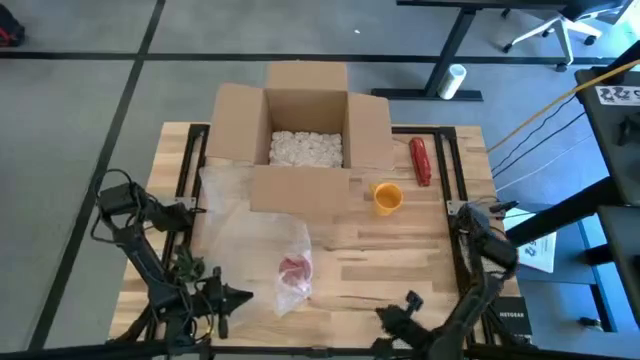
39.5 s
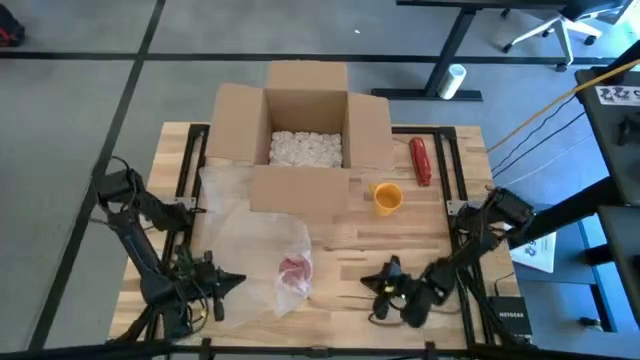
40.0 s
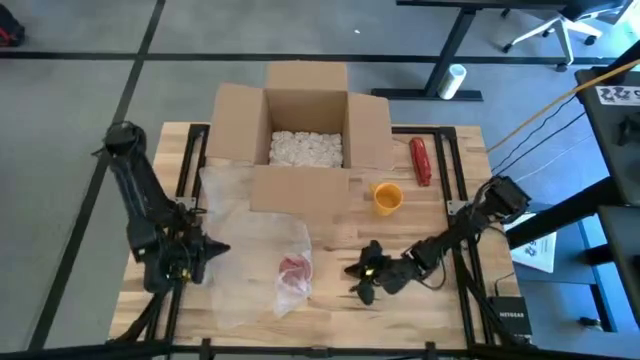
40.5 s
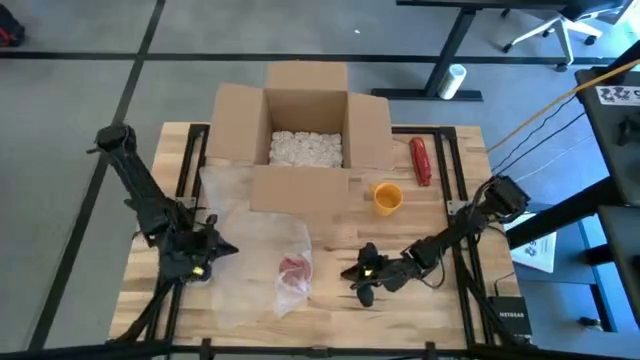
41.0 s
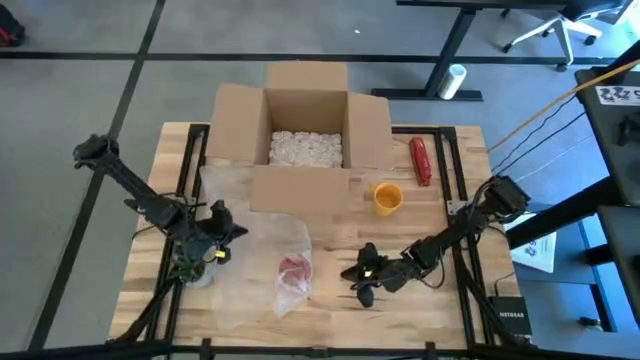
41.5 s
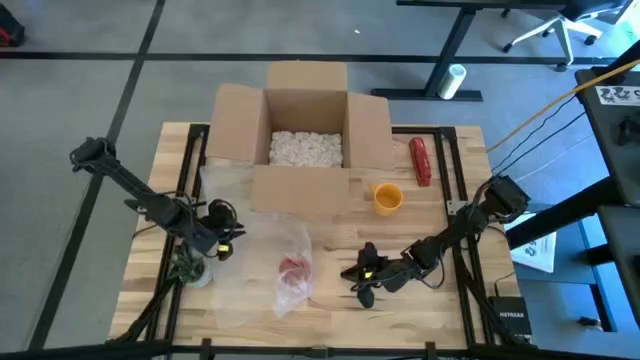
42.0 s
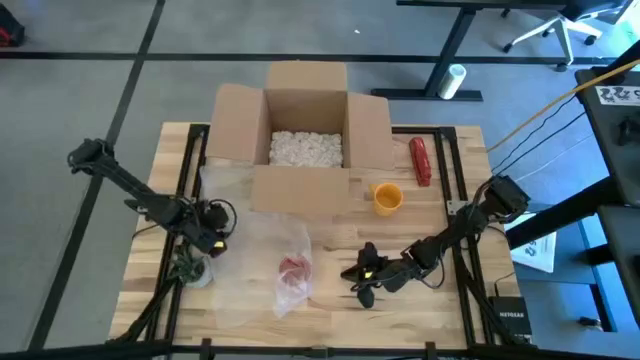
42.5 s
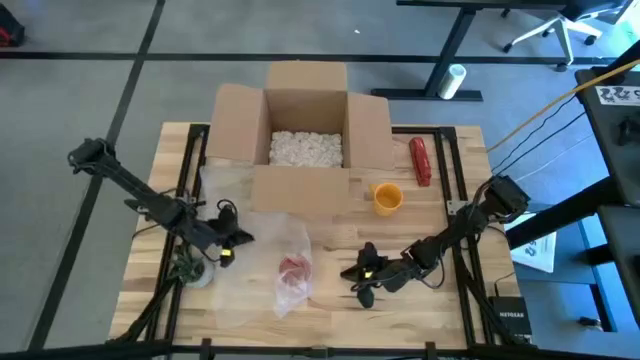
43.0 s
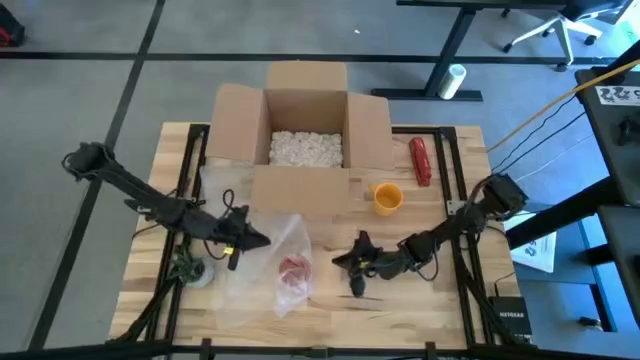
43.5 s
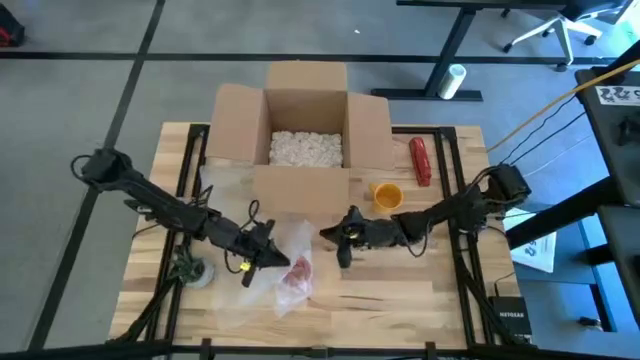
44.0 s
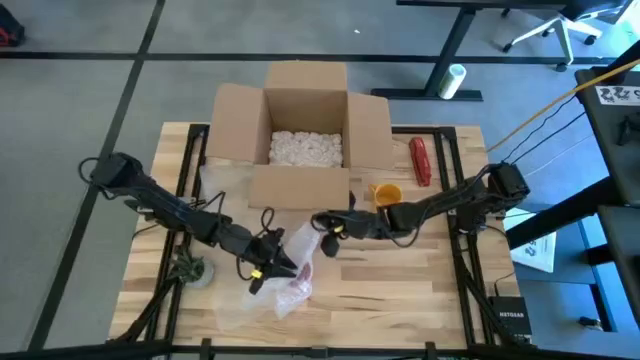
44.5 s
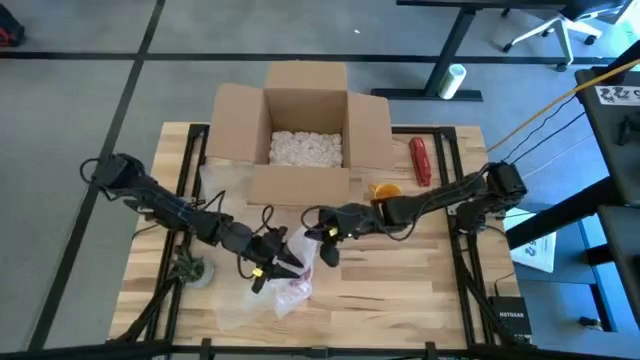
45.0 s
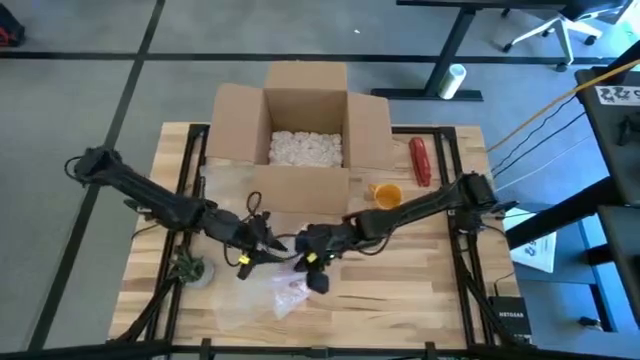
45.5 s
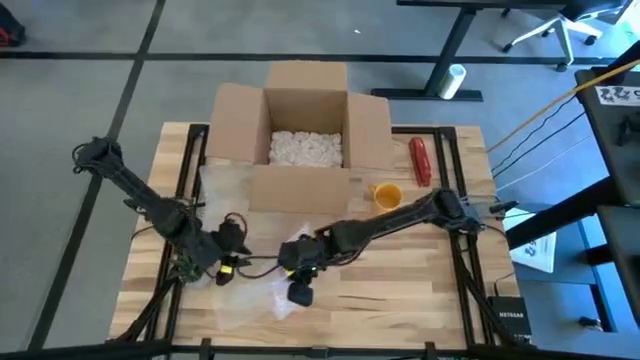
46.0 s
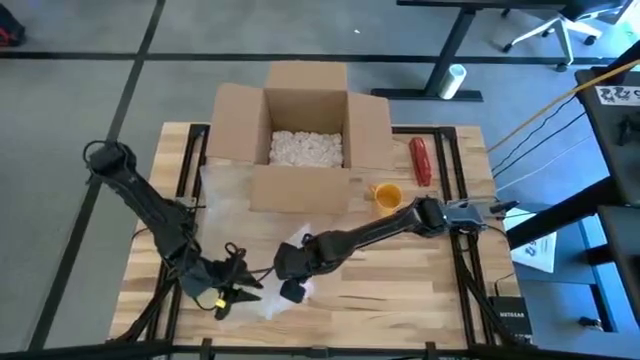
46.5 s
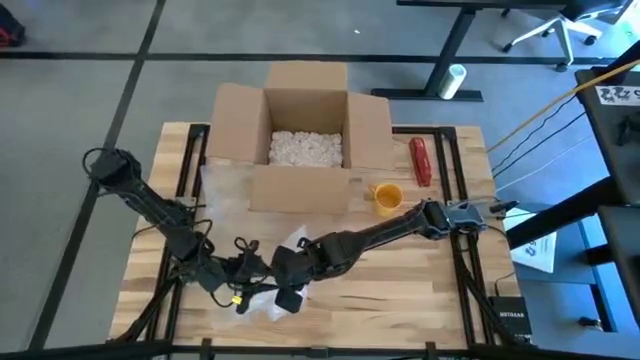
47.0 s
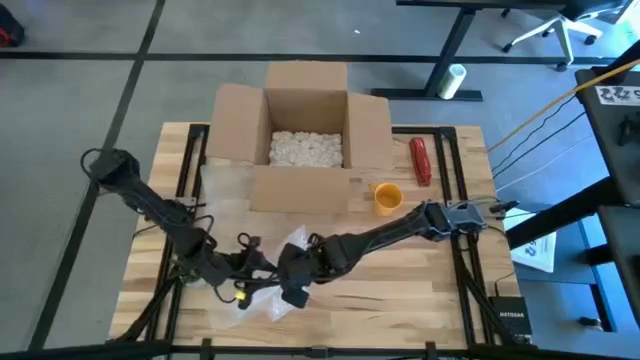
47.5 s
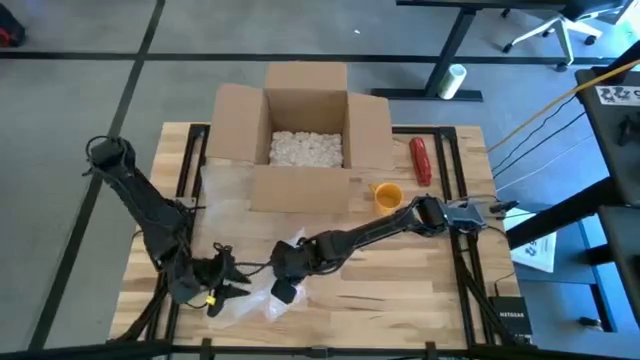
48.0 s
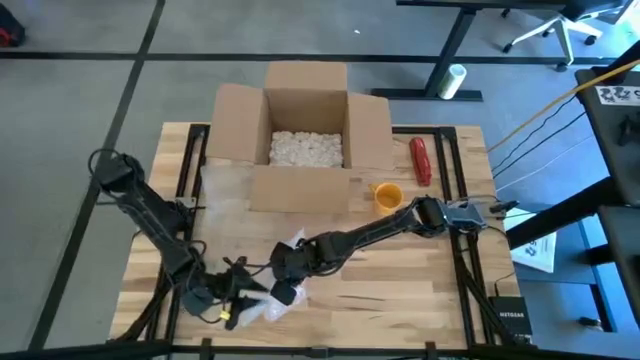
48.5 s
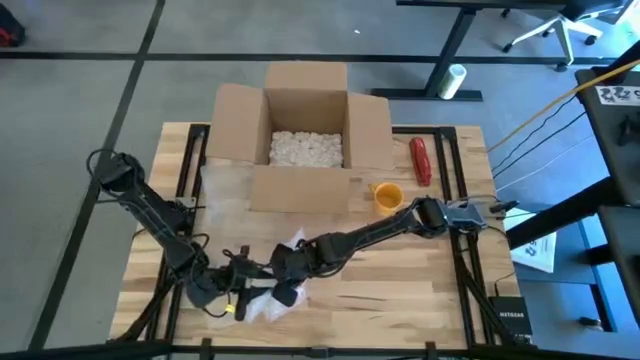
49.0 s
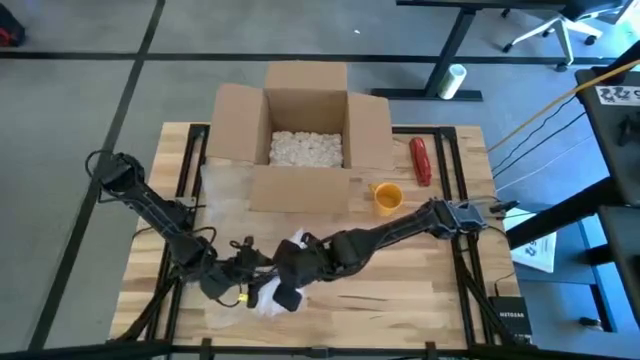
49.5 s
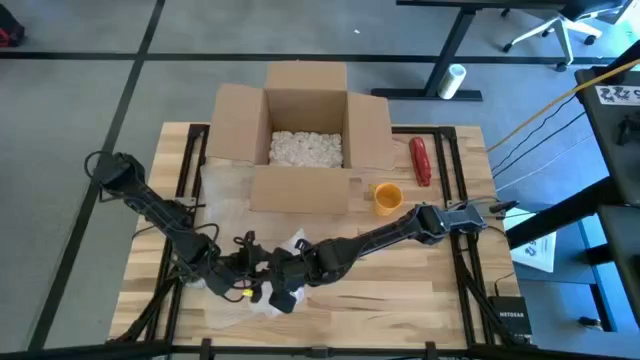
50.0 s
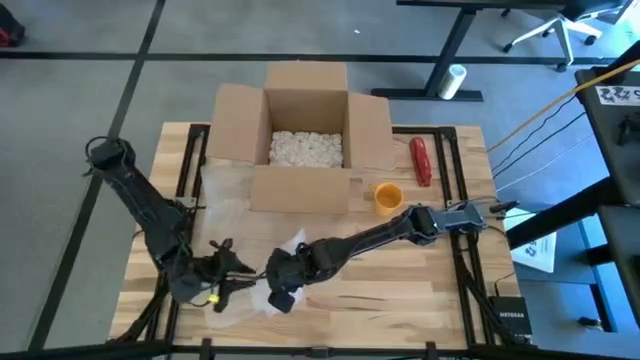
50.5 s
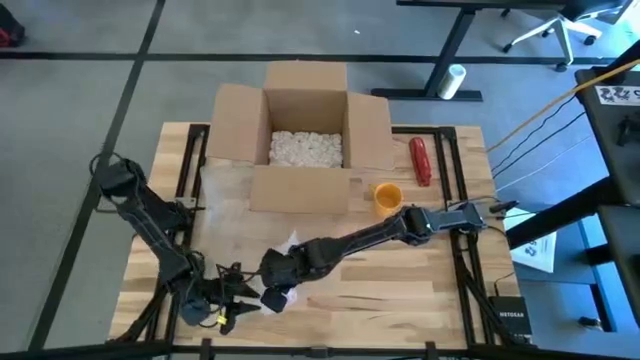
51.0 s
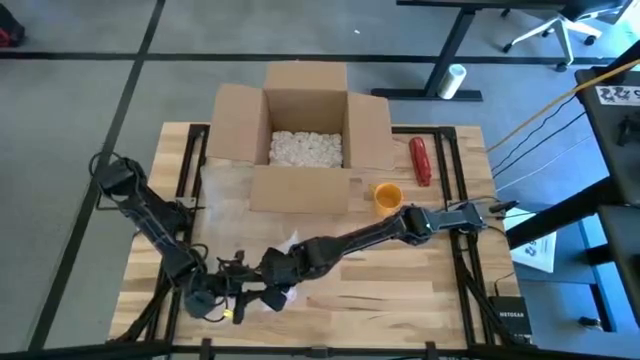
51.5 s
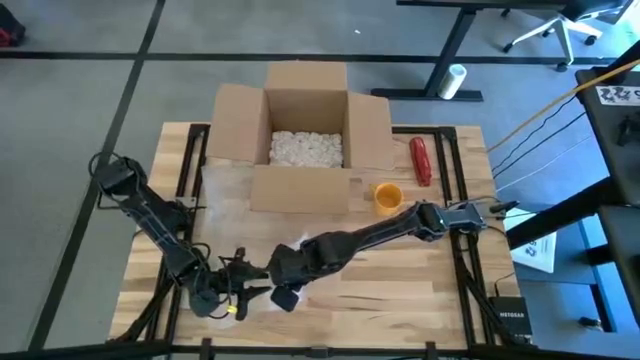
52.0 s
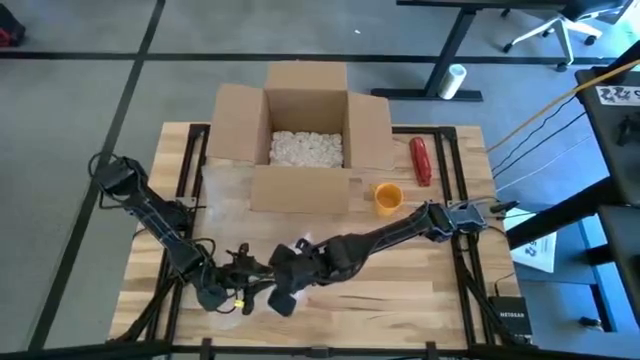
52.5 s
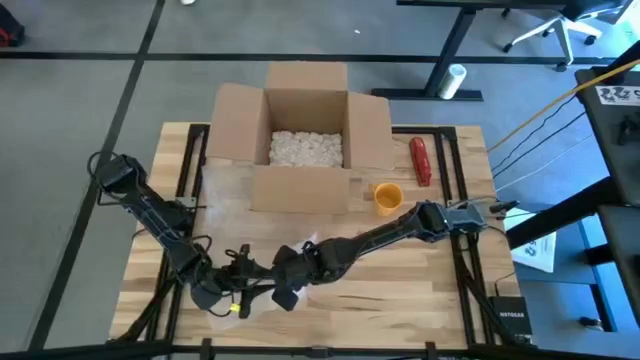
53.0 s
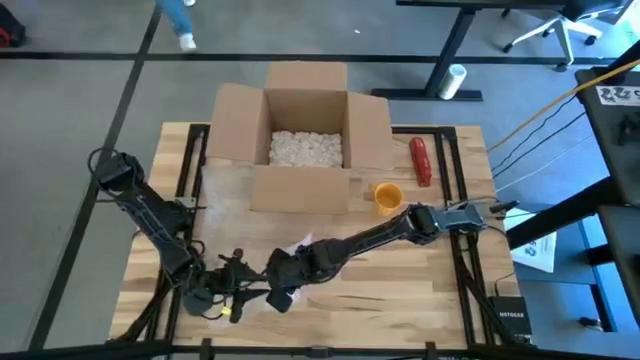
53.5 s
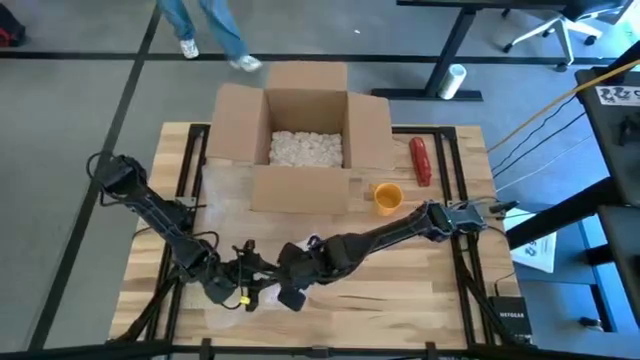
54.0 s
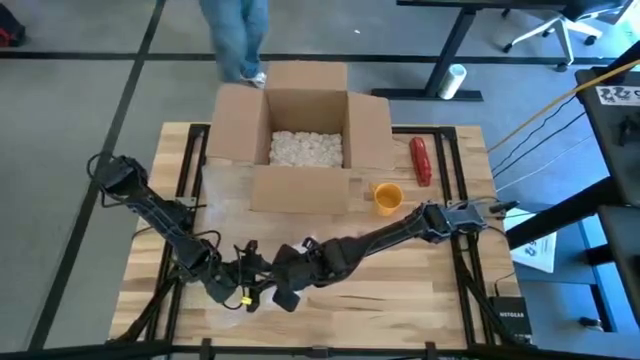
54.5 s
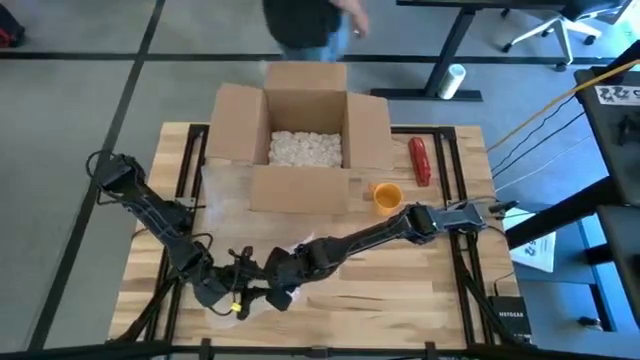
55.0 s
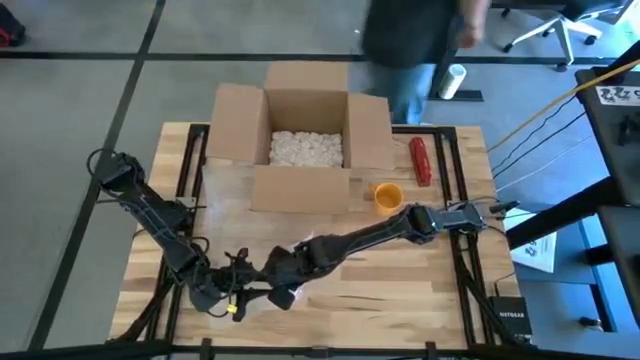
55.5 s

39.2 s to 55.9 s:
Task: wrap mug
Wrap the red mug with bubble wrap

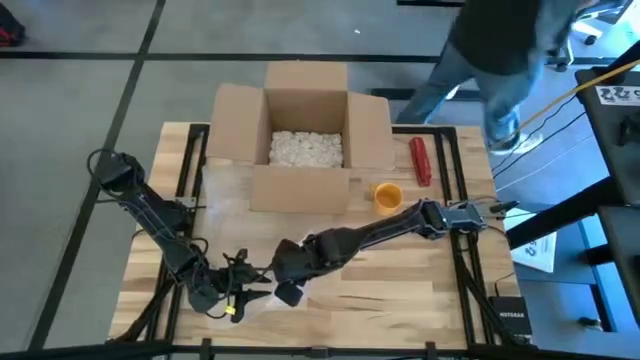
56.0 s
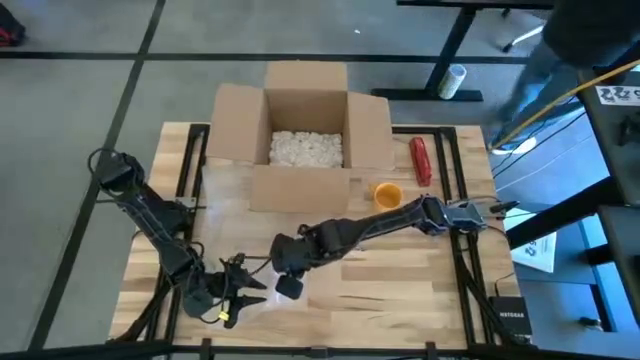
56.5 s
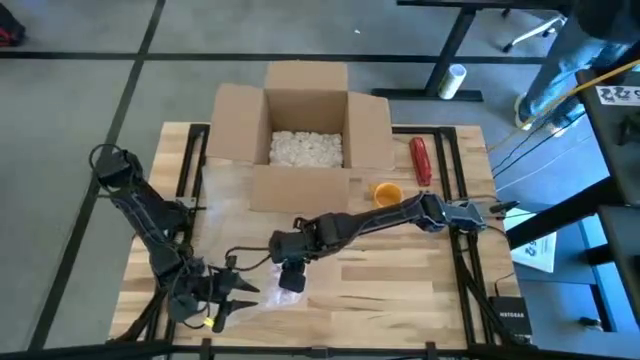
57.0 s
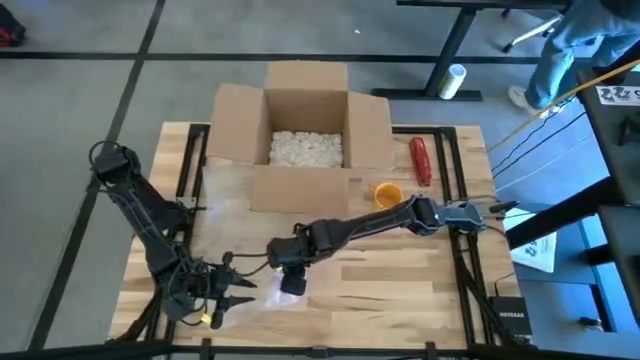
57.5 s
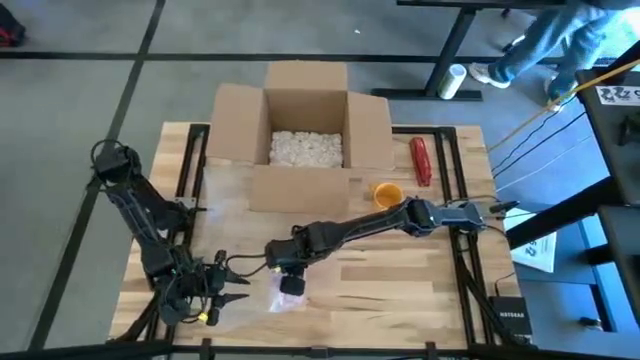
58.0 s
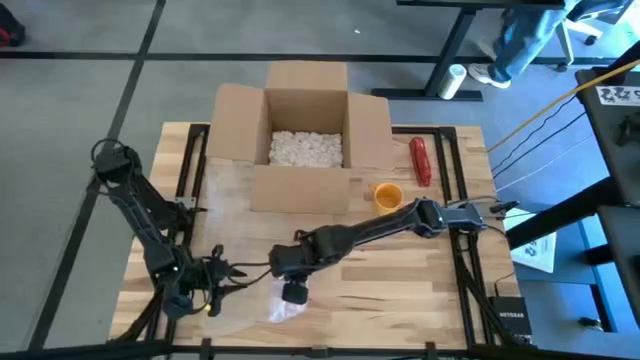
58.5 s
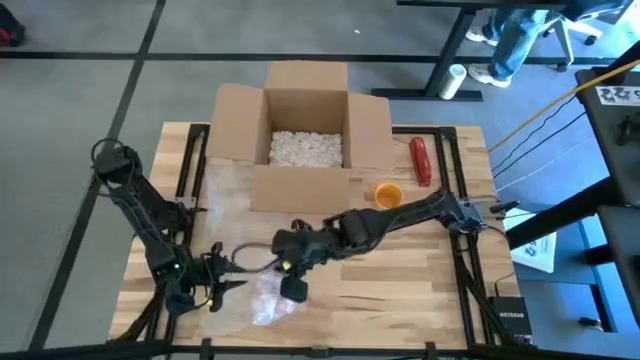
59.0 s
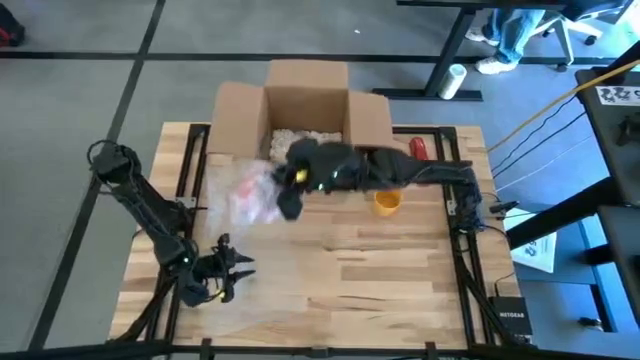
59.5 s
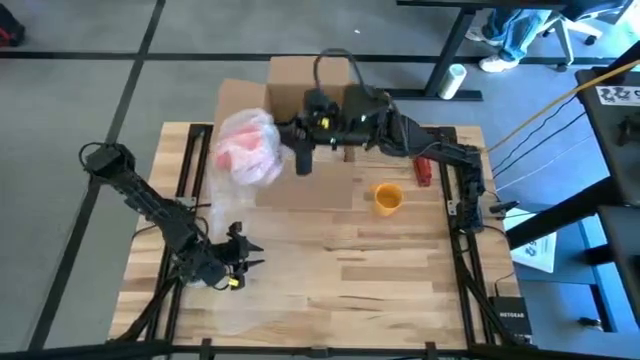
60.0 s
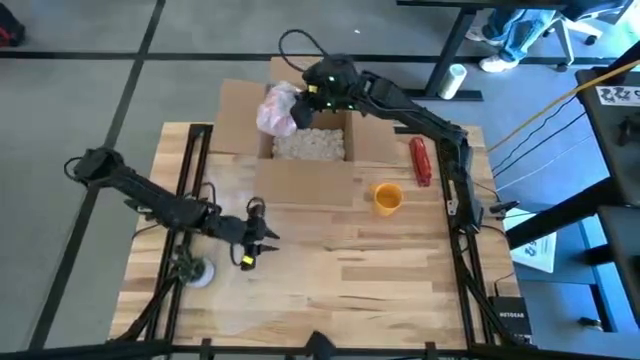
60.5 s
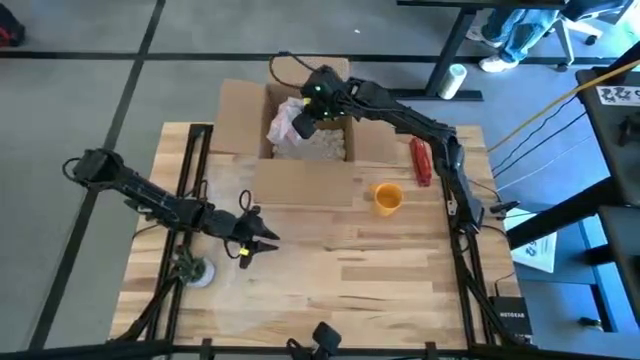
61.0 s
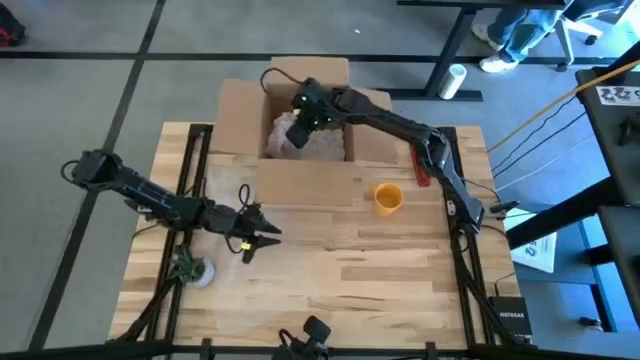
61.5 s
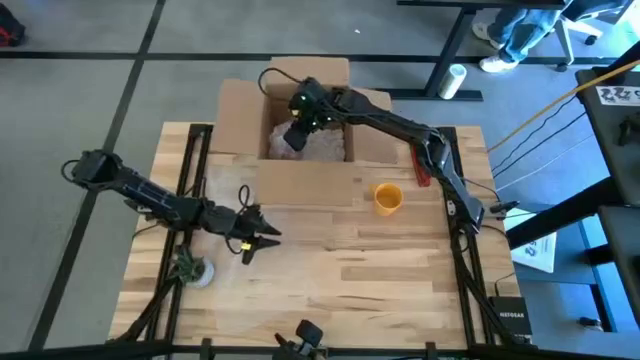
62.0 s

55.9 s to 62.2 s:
Put the wrapped red mug into the cardboard box
